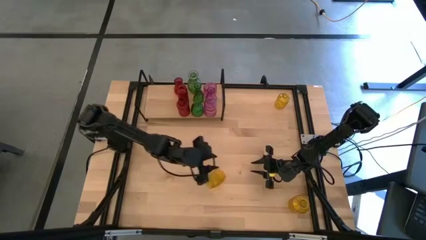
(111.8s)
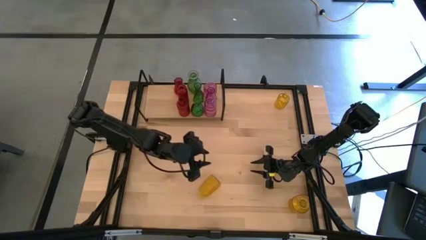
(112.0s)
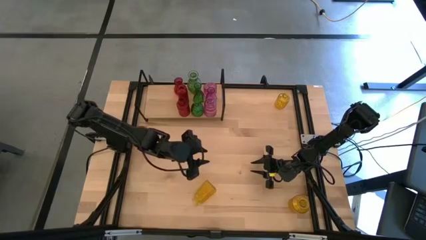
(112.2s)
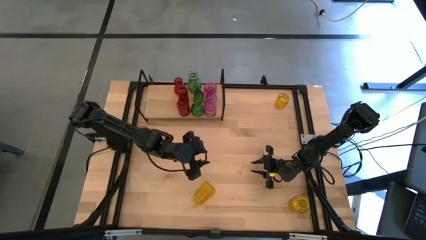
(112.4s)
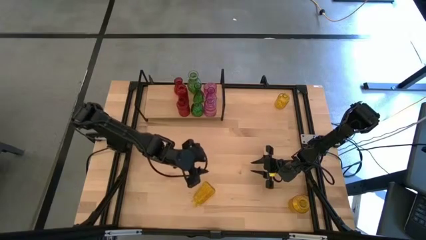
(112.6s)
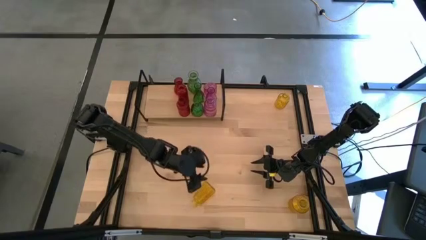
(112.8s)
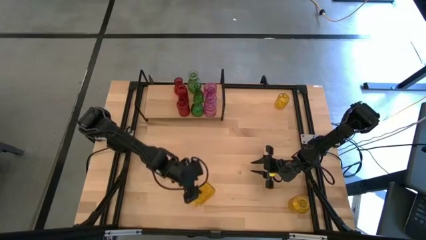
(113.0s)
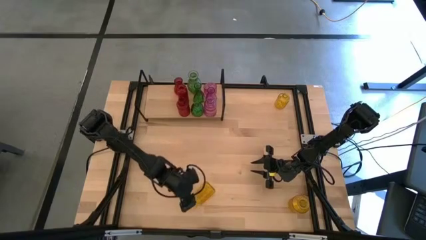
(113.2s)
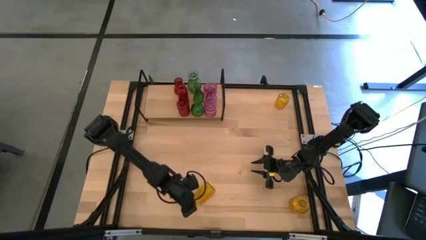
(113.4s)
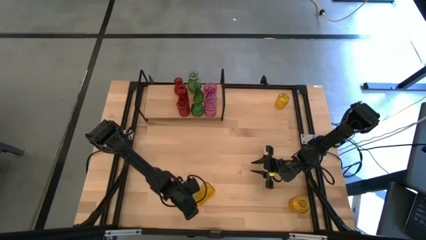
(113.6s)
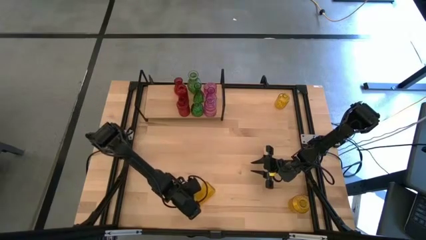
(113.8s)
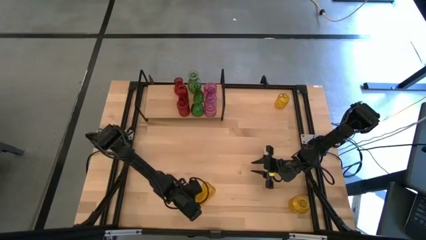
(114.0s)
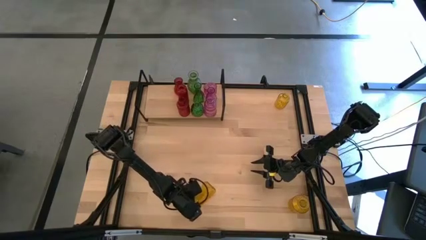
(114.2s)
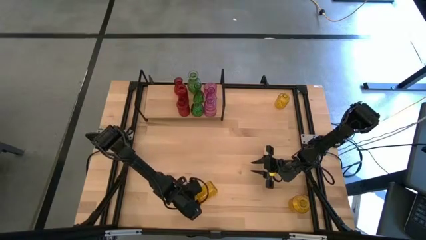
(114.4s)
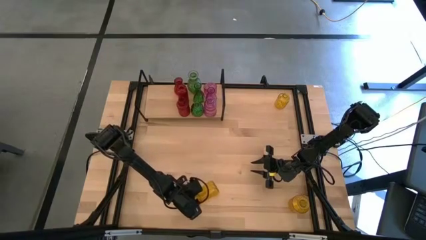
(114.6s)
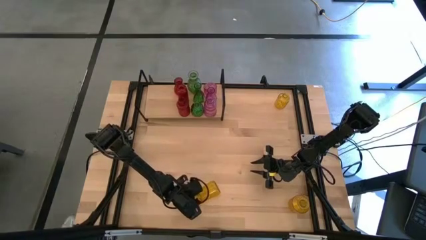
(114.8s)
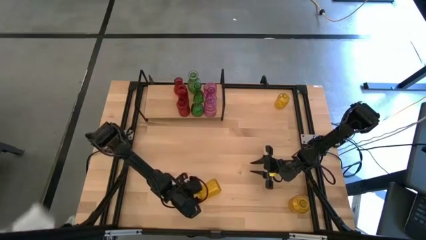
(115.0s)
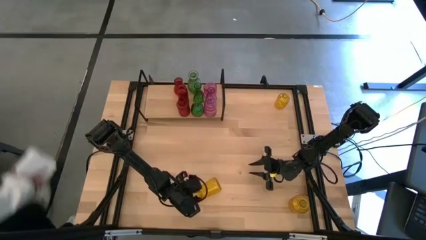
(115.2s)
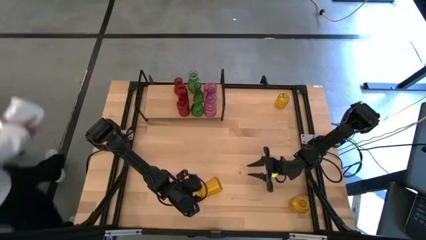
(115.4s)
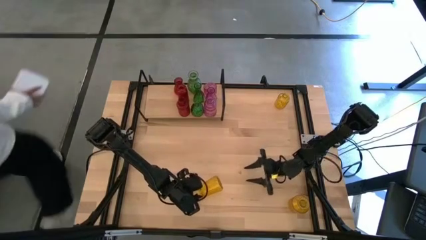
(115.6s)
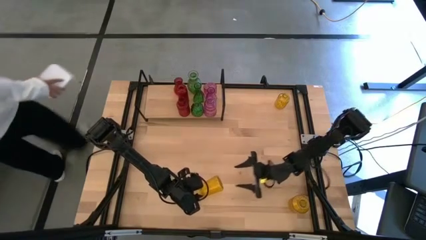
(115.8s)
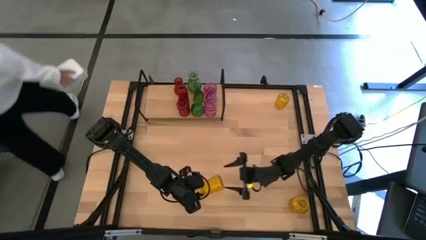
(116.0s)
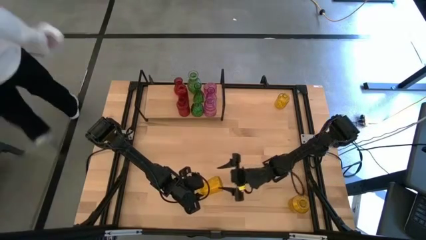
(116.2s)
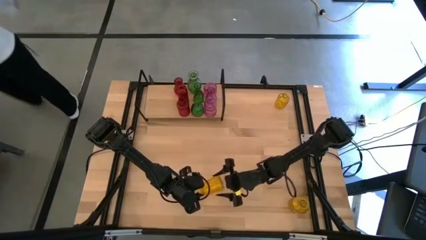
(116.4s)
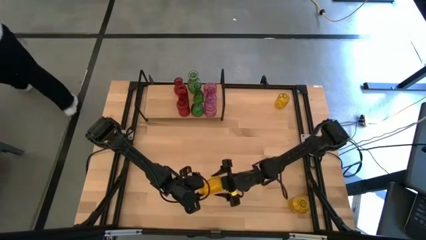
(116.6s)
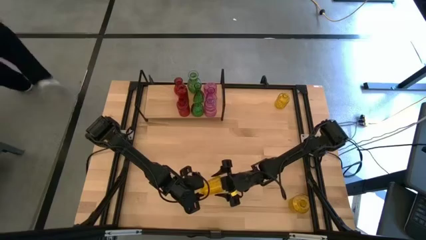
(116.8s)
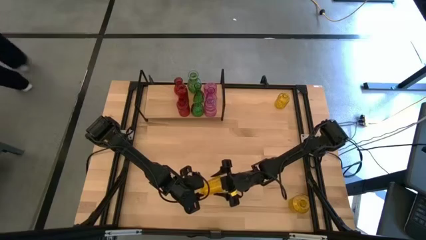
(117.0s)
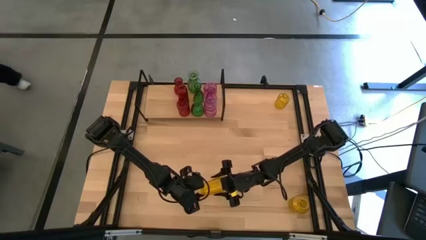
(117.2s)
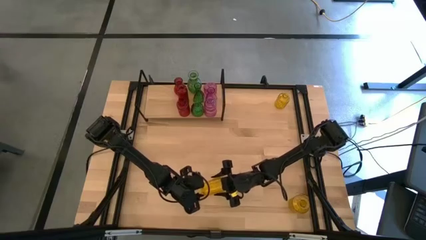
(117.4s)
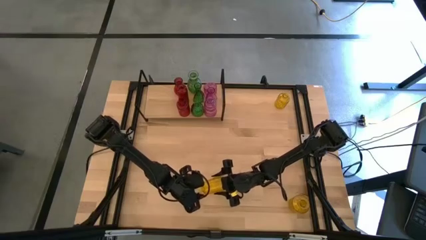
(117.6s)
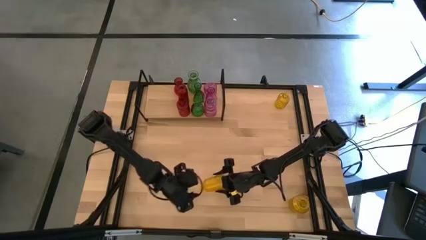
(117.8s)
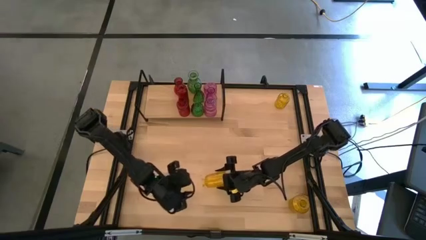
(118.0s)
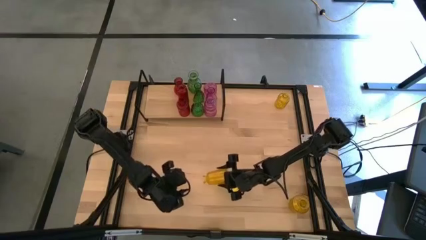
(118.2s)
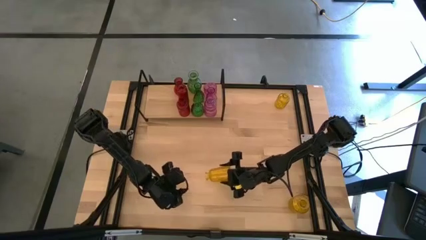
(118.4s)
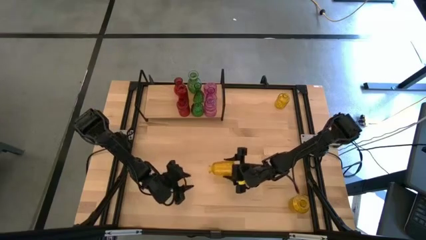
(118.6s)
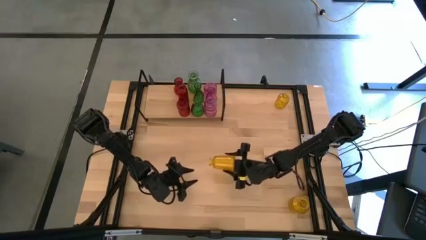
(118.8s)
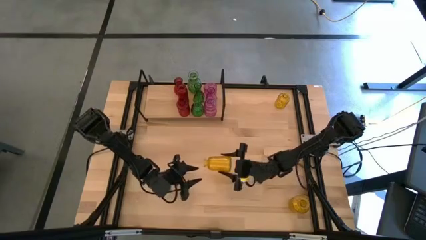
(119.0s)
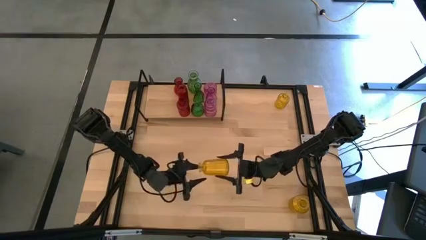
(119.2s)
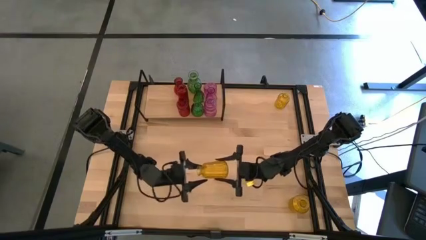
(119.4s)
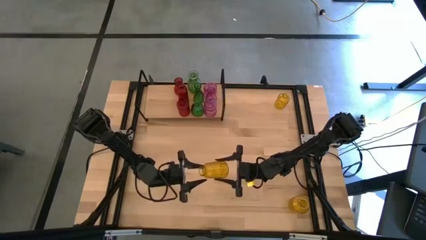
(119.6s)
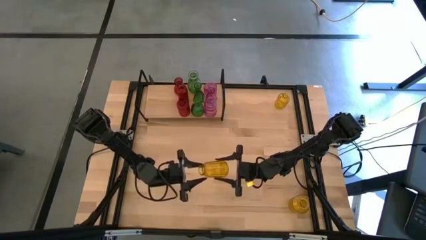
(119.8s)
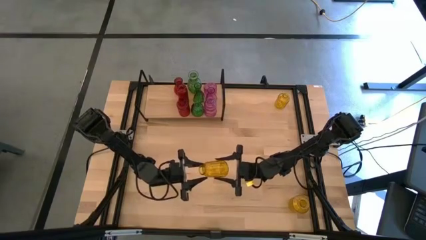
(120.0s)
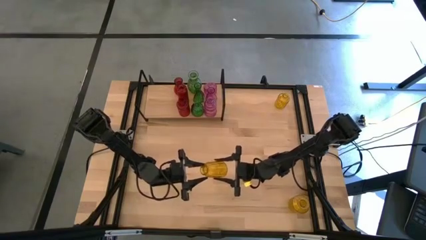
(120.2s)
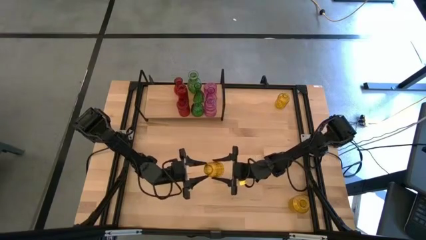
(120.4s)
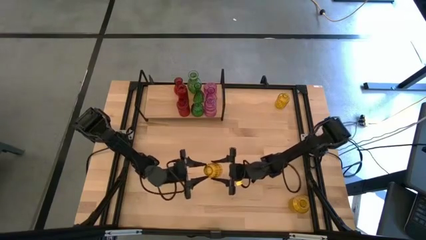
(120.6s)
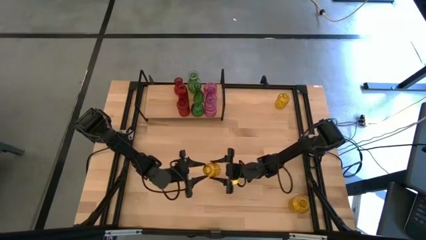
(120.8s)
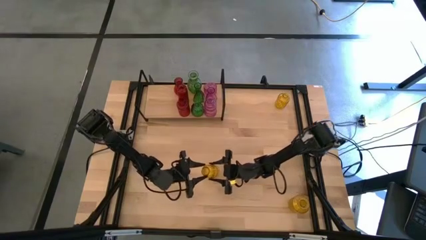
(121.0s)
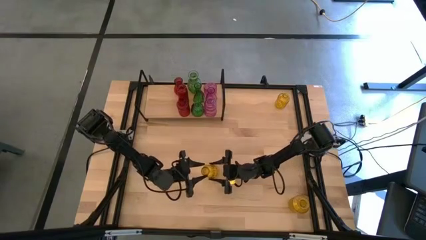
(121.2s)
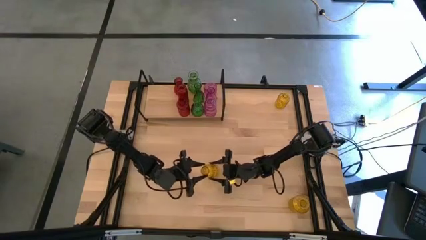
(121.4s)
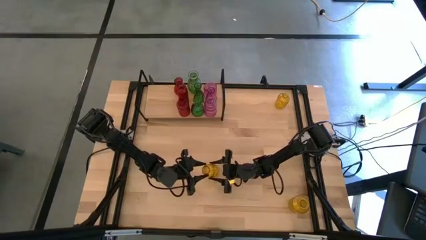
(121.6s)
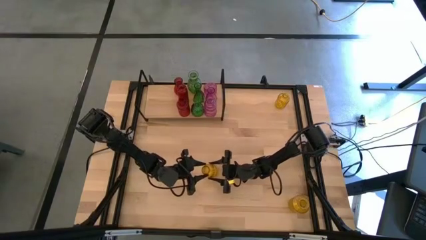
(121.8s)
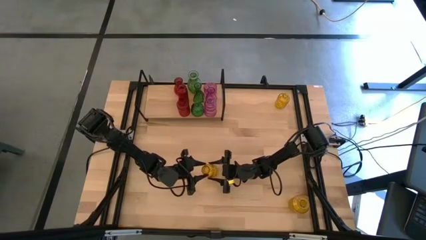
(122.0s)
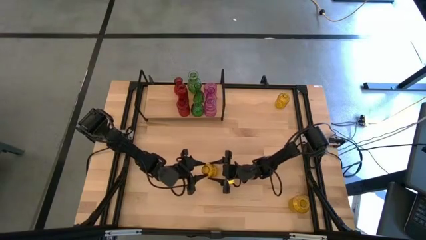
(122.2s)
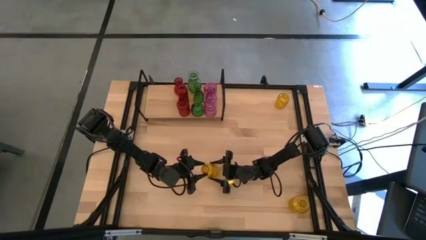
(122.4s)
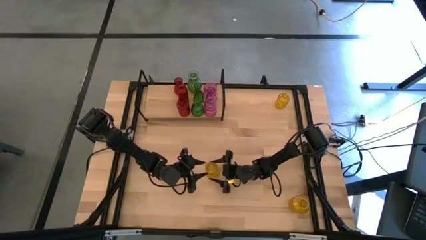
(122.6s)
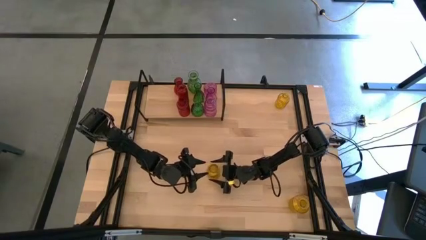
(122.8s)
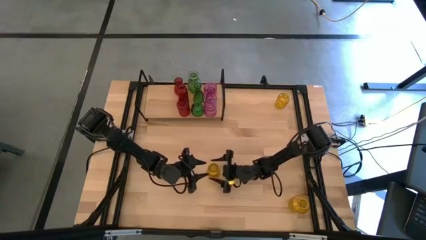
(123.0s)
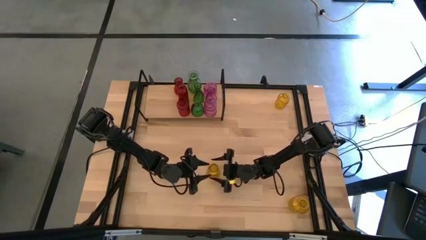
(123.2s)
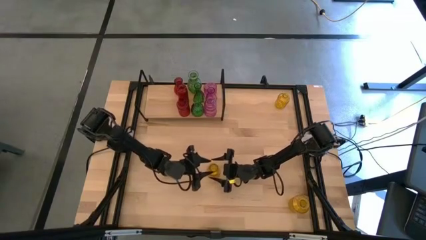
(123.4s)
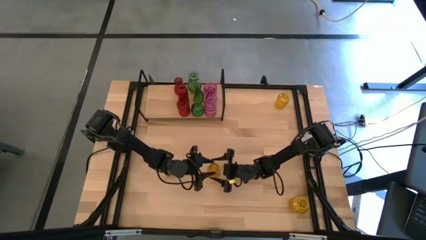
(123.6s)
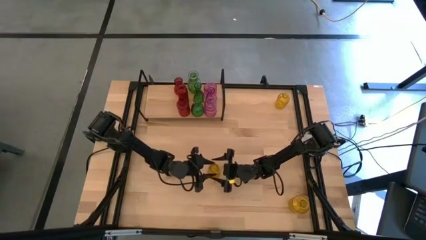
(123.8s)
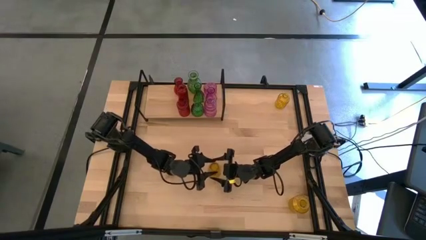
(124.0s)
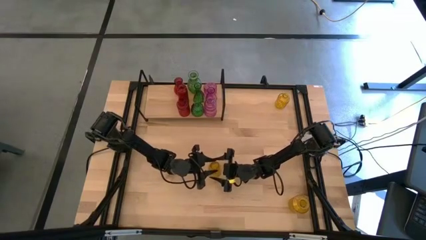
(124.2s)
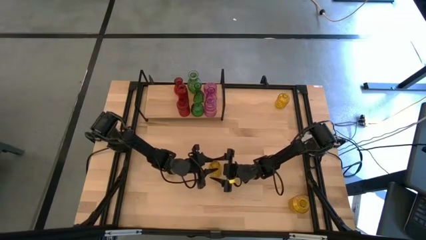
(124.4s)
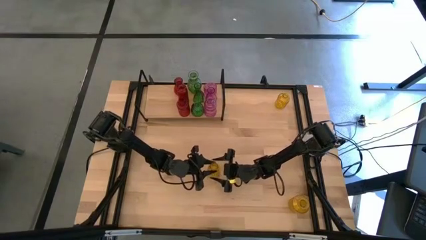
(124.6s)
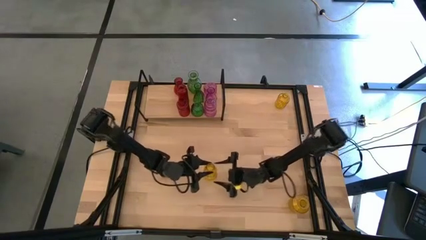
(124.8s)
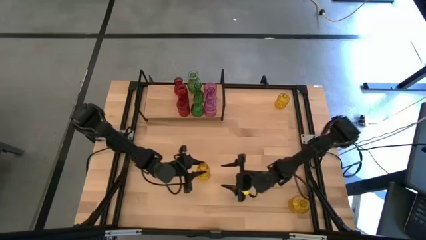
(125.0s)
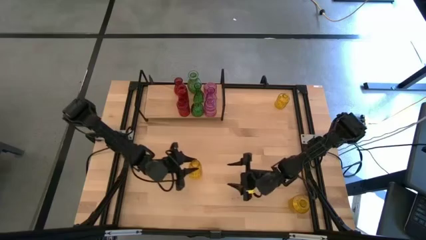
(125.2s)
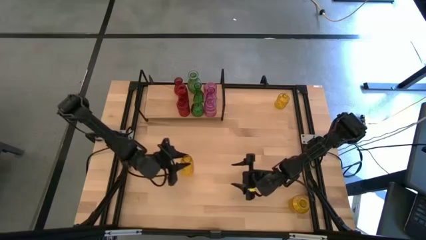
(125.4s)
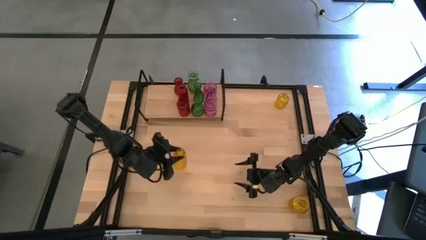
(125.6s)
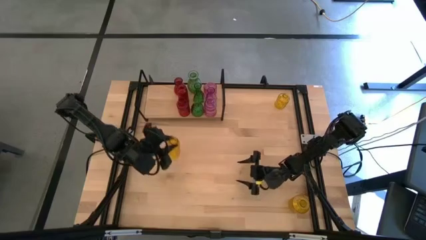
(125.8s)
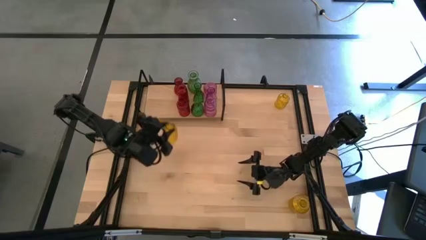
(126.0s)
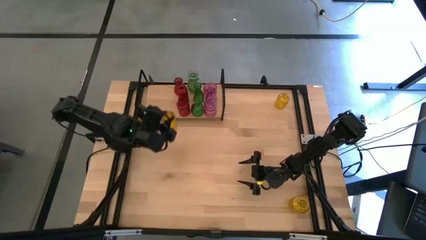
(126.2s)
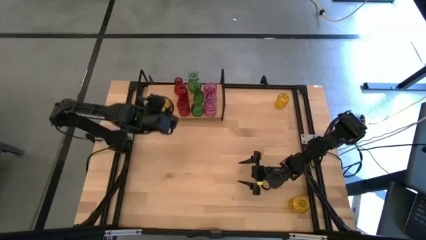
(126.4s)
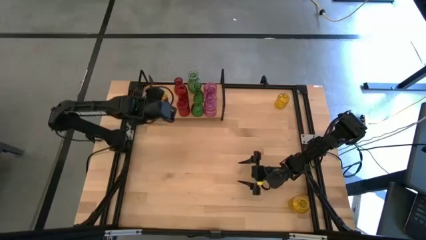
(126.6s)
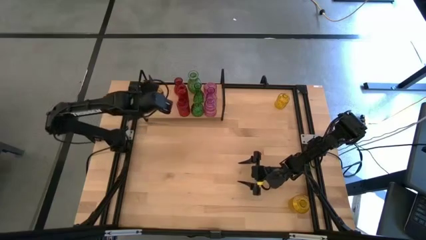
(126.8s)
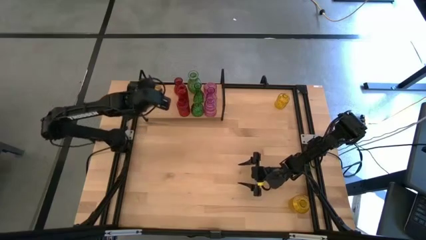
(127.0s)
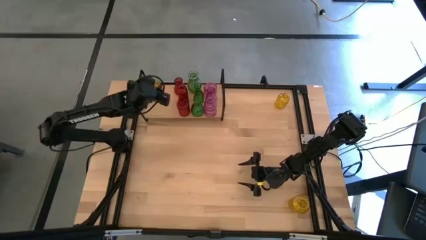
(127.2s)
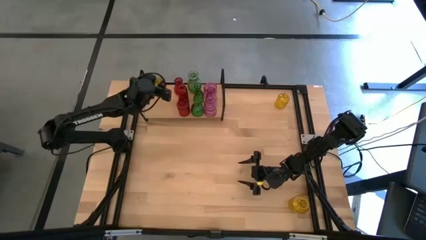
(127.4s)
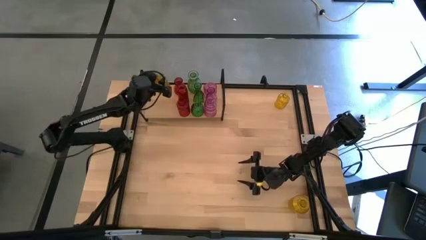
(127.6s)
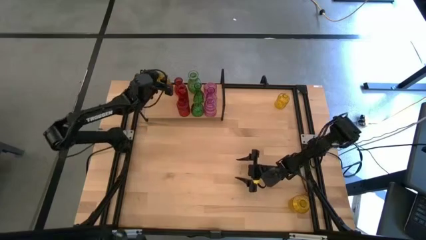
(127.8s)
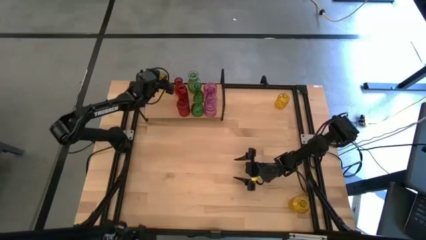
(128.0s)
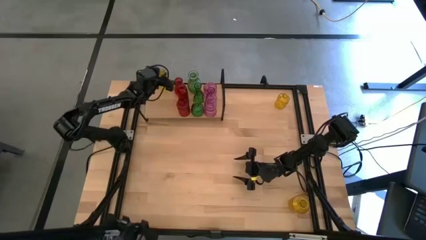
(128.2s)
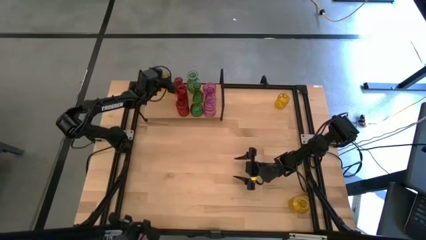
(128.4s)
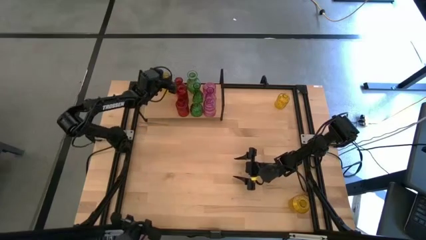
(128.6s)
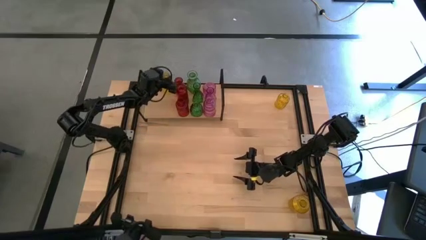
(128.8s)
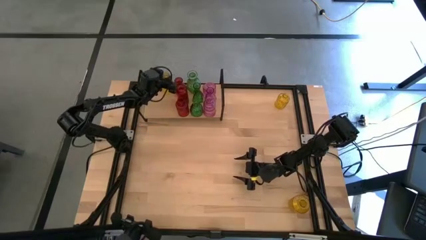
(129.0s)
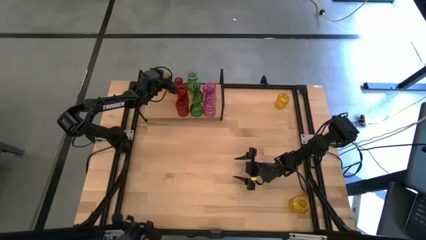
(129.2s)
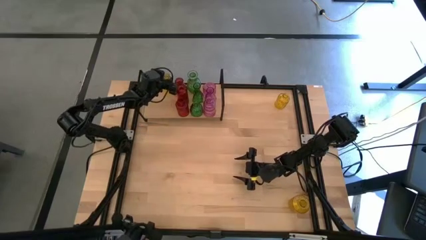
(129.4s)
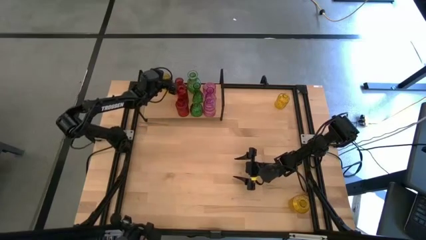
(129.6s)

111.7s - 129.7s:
Task: sort vases onto shelf
Put the middle yellow vase on the shelf
